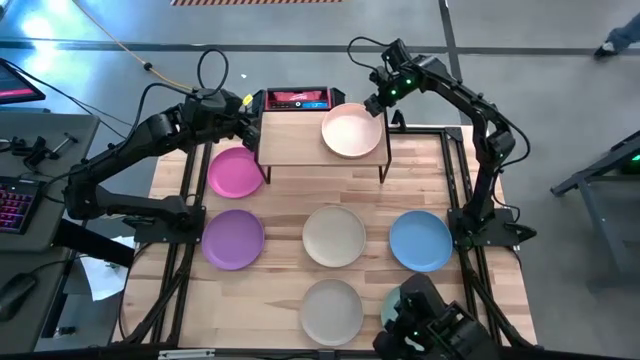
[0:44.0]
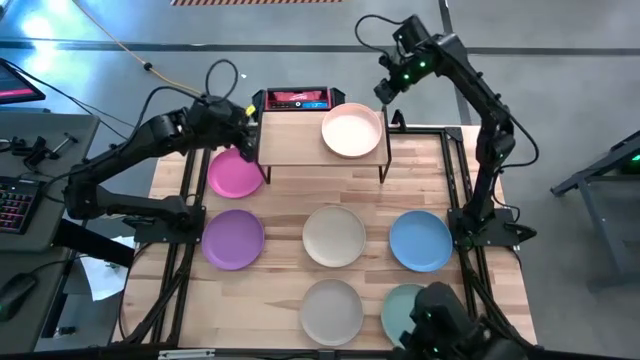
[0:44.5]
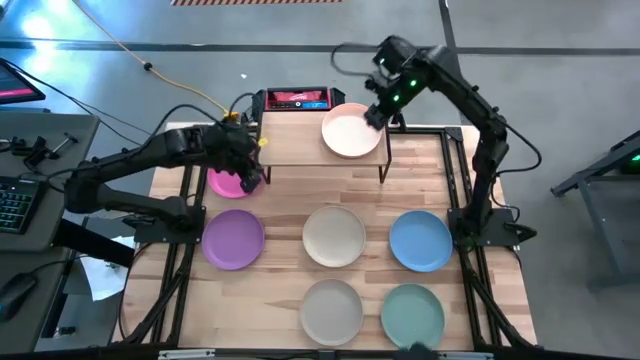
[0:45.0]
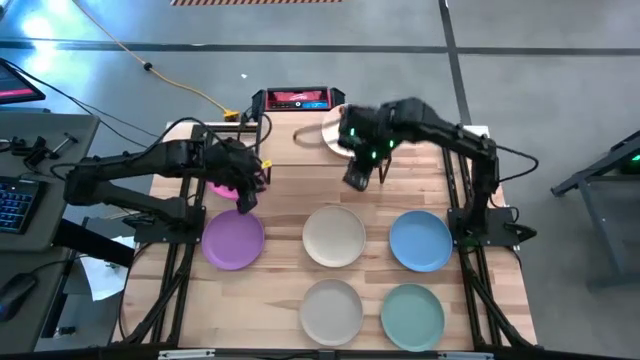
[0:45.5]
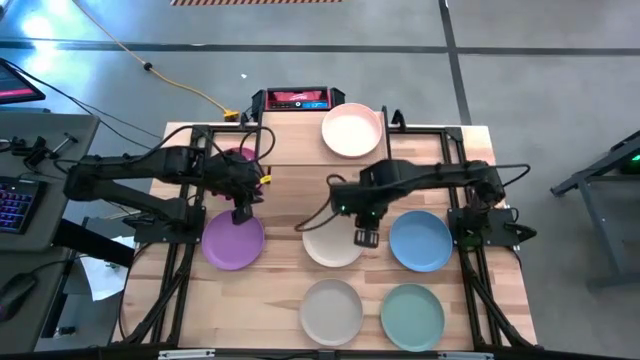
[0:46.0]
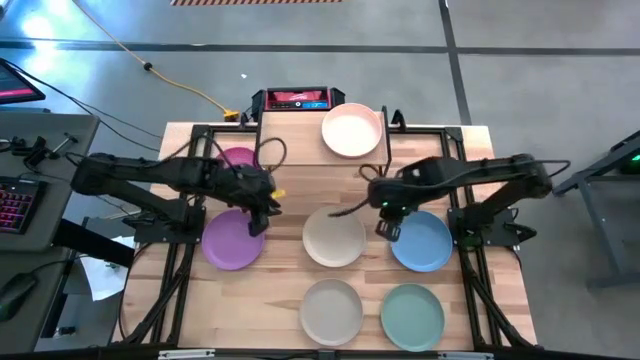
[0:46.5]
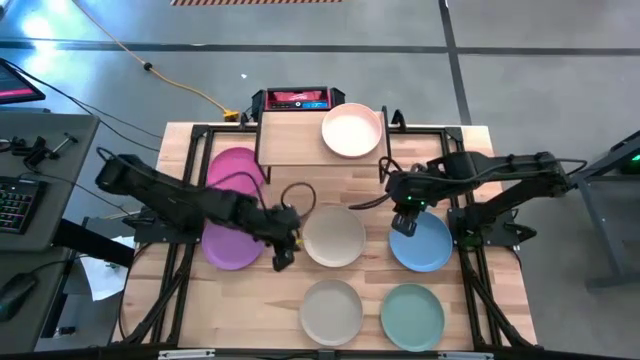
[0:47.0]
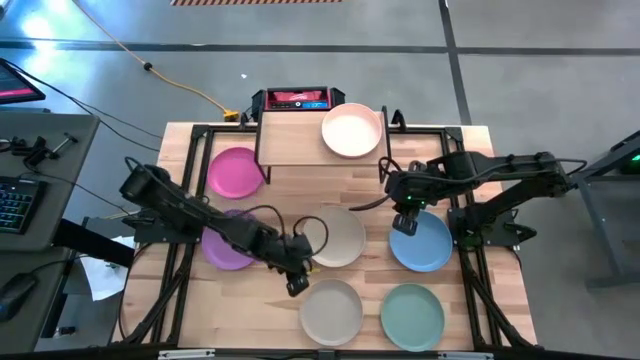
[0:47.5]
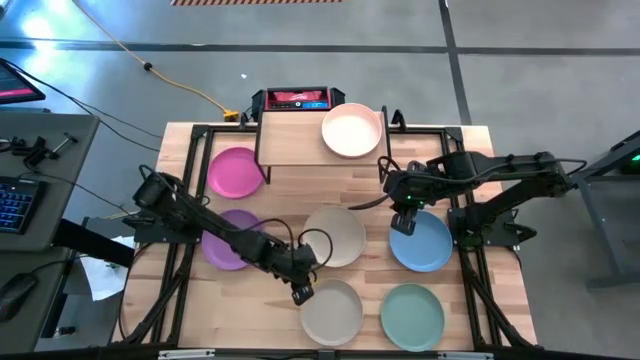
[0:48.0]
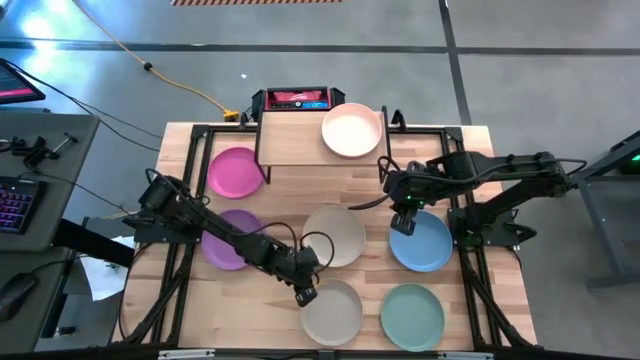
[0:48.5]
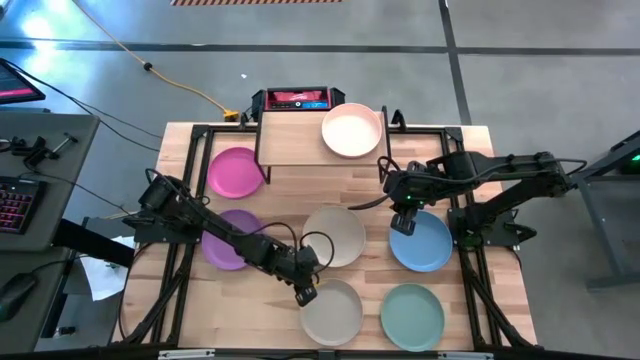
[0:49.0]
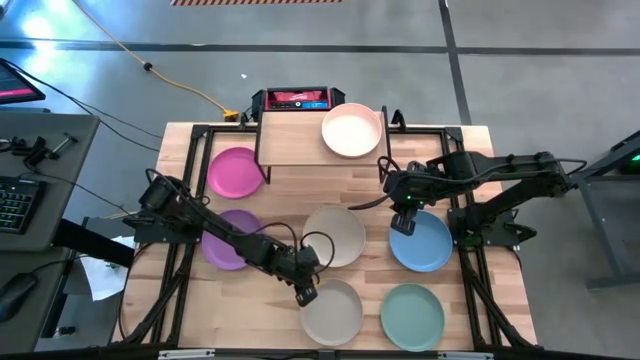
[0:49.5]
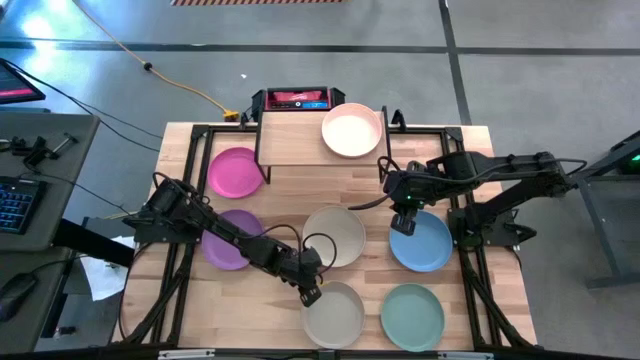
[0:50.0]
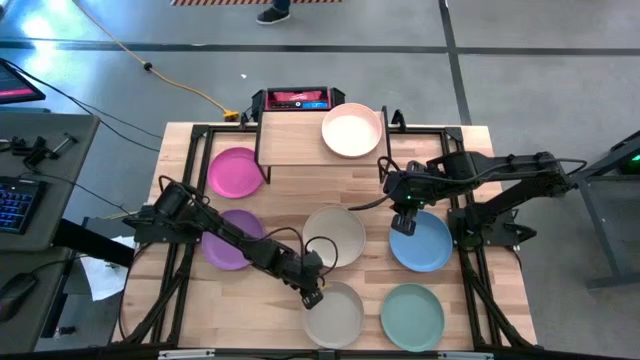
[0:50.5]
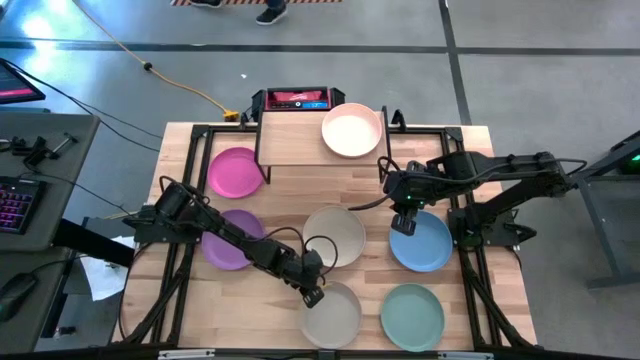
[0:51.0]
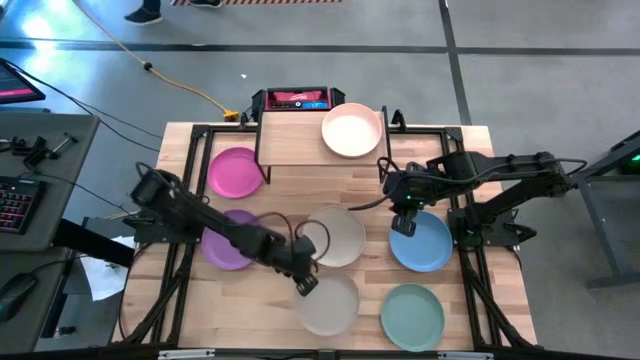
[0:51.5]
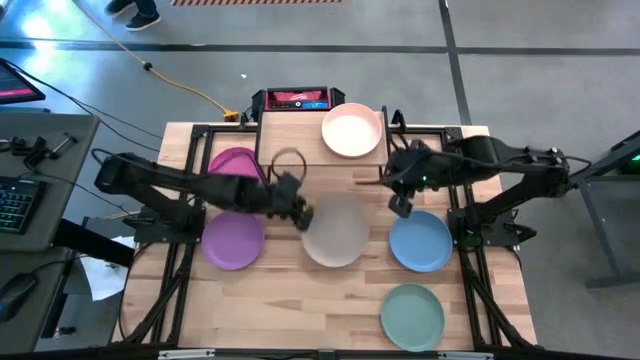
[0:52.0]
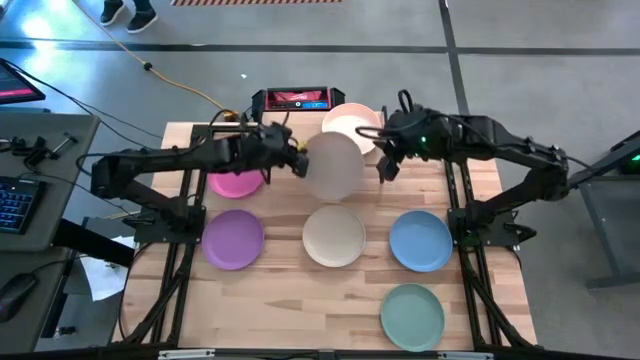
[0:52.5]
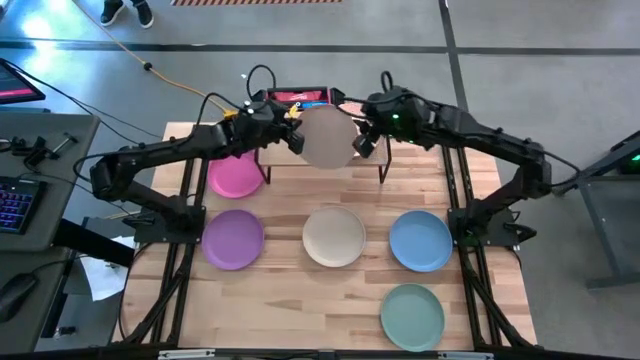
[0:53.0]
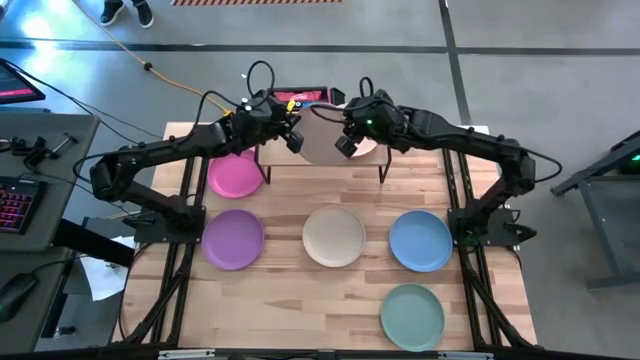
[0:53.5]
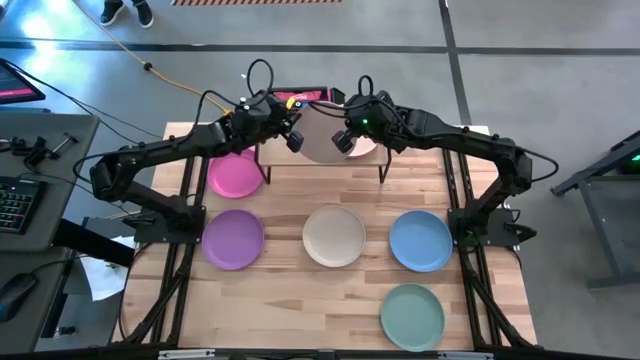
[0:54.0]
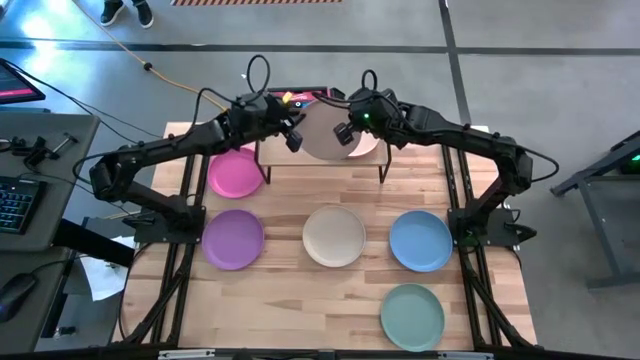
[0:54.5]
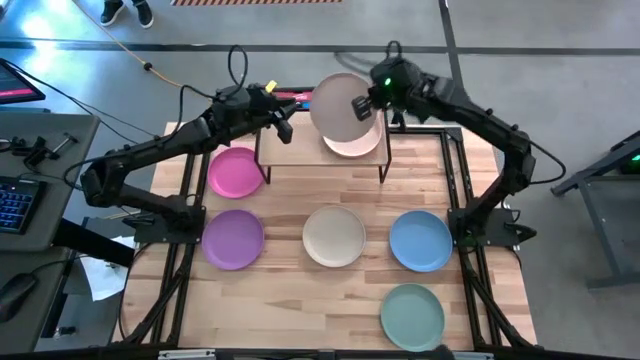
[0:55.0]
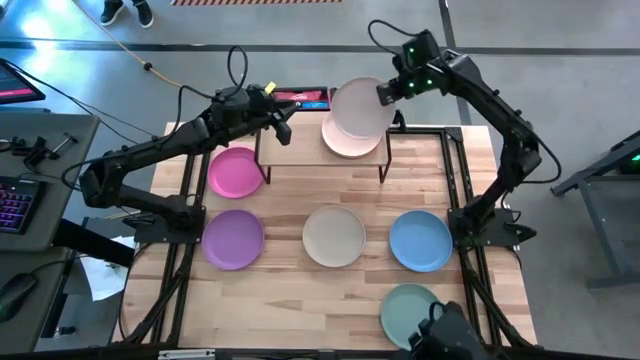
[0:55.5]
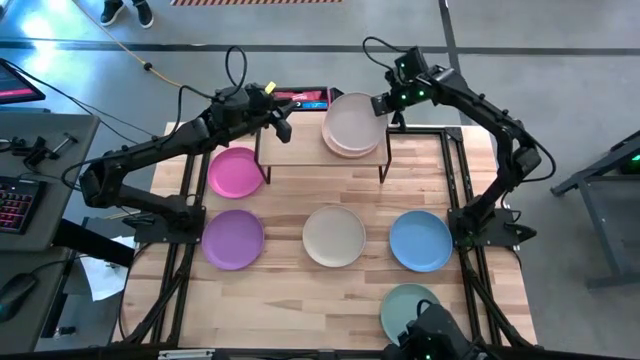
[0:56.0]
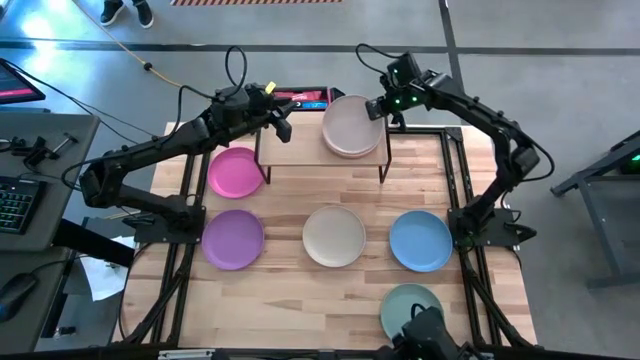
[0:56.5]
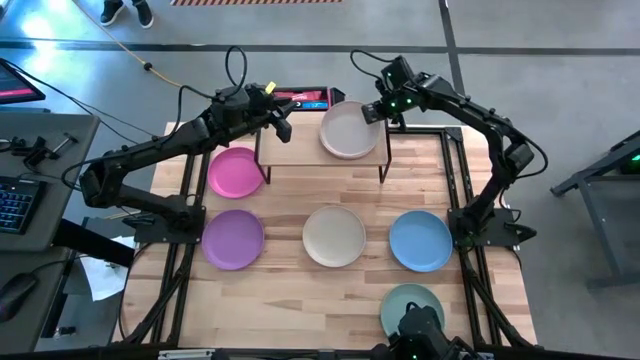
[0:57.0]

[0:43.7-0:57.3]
Task: Place and stack plates onto a shelf
Stack the grey plate on top of the light brown stacked plates on the shelf

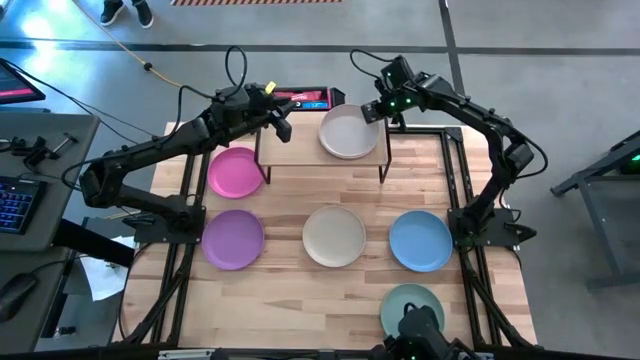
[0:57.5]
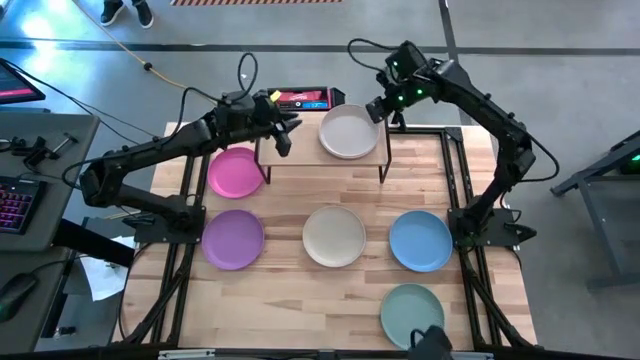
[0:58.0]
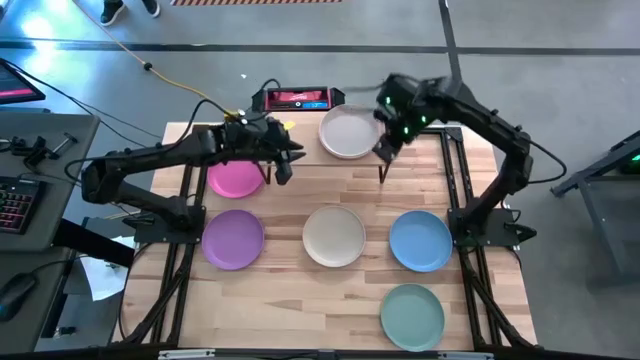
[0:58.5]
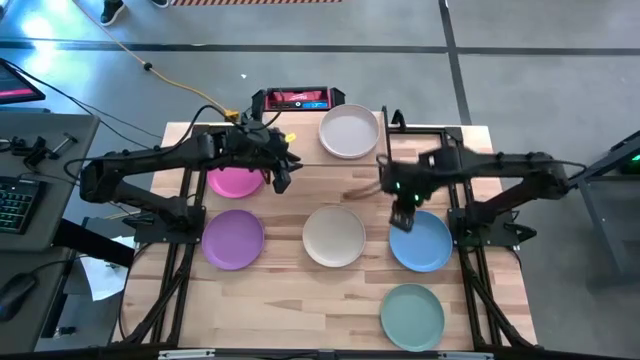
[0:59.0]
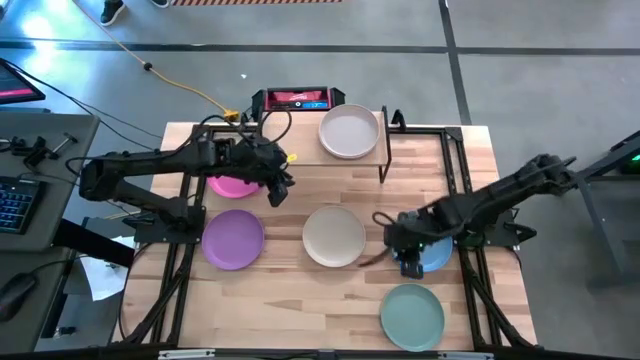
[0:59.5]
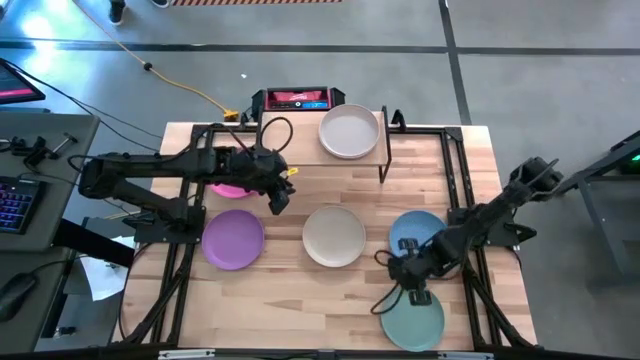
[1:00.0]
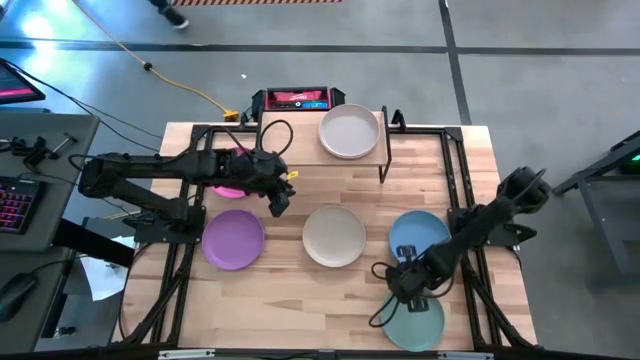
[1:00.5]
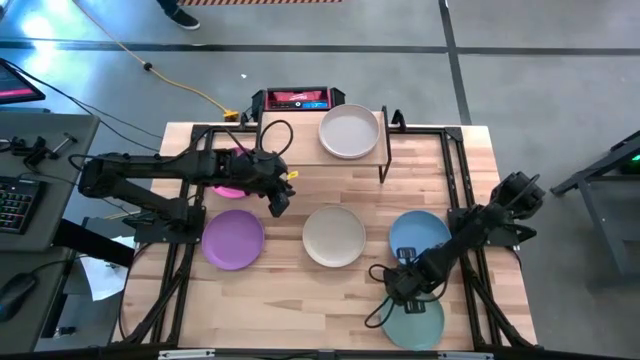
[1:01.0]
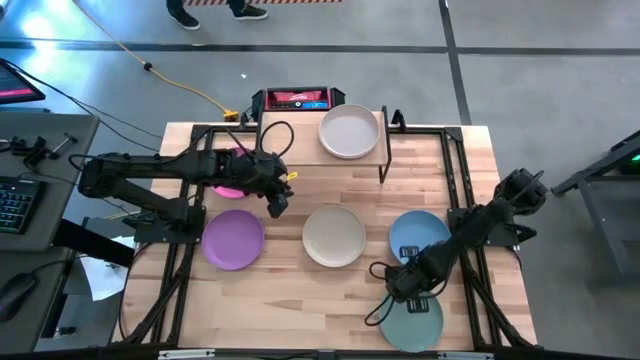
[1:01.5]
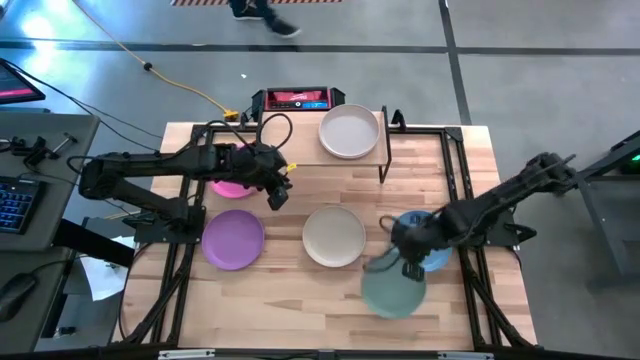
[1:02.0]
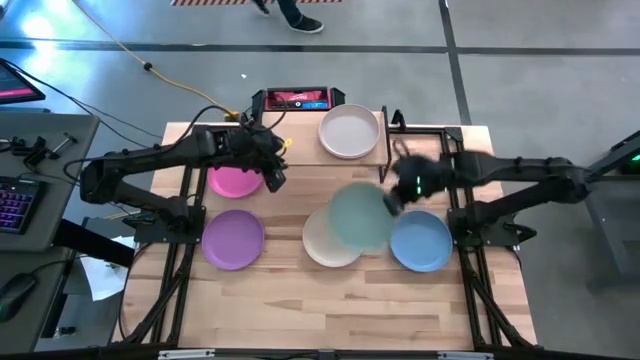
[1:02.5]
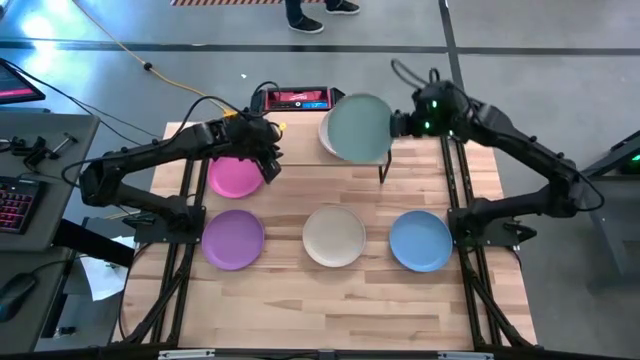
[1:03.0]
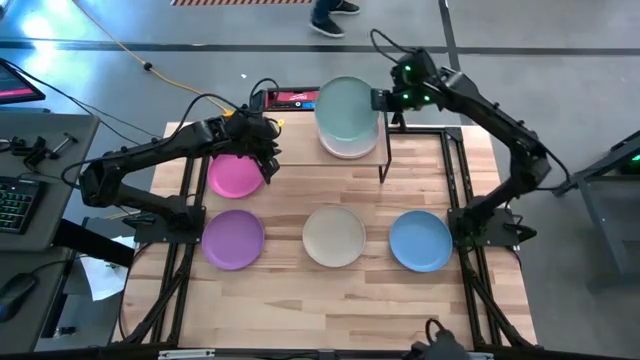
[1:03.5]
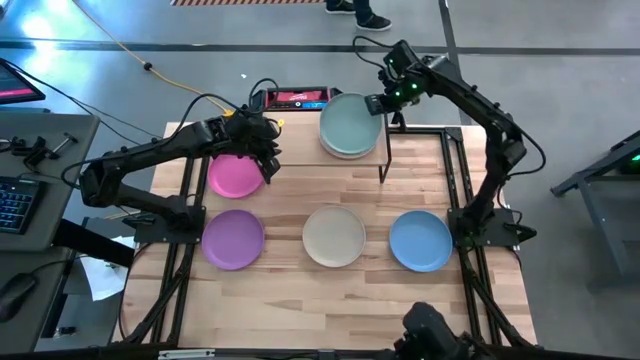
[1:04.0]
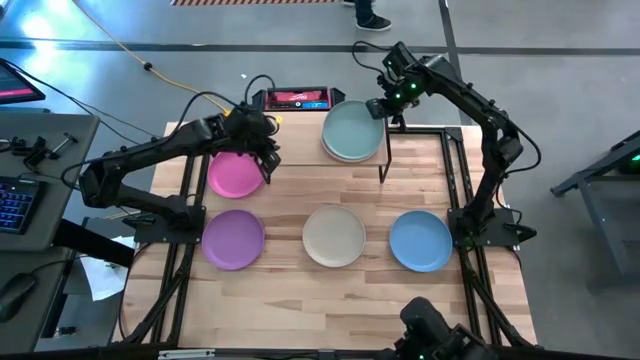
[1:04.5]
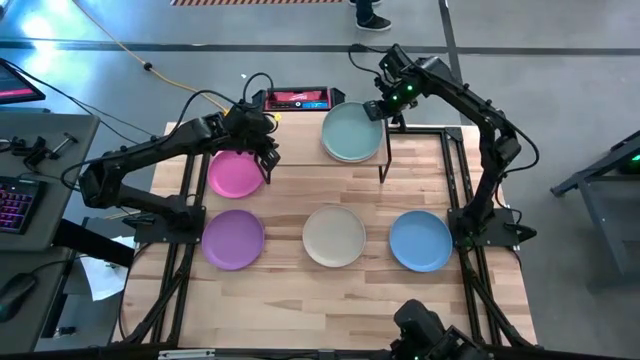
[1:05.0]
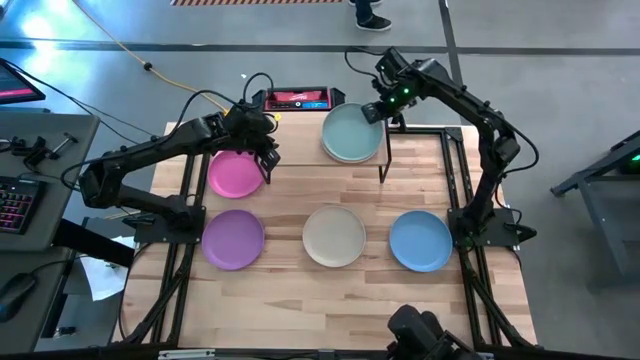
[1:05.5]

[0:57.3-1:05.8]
Stack the light blue plate on top of the gray stacked plates on the shelf
